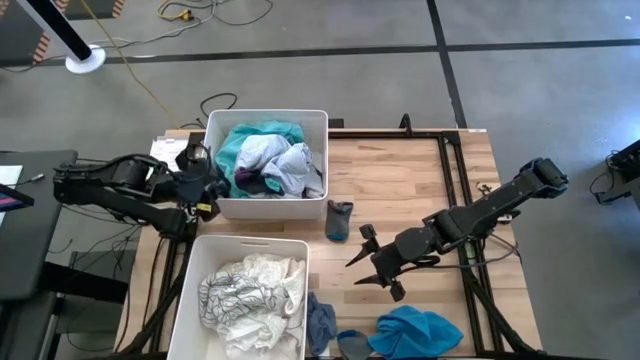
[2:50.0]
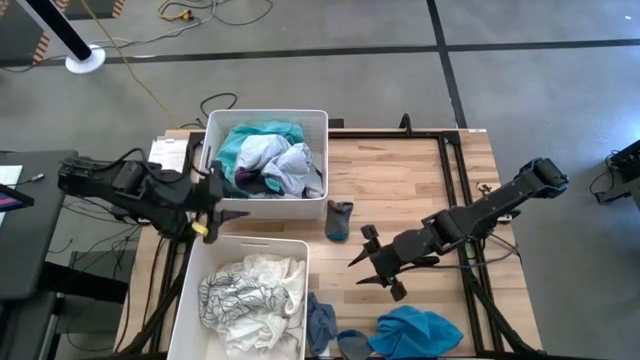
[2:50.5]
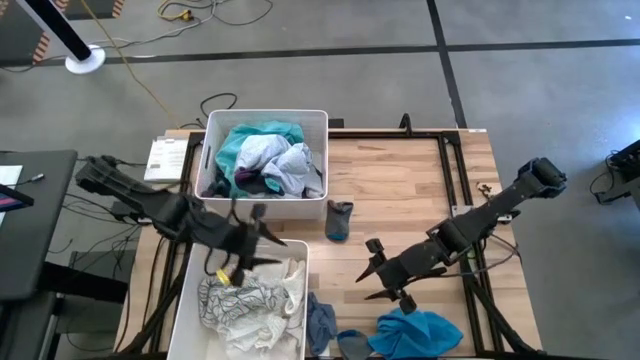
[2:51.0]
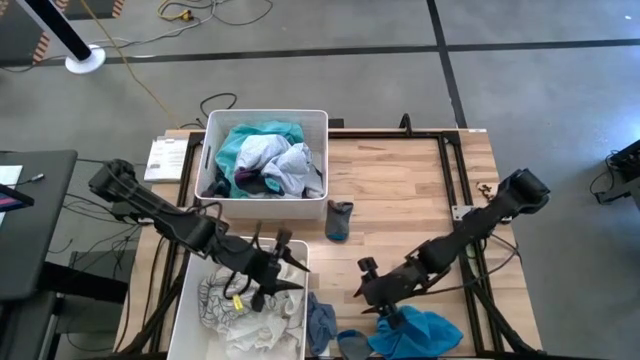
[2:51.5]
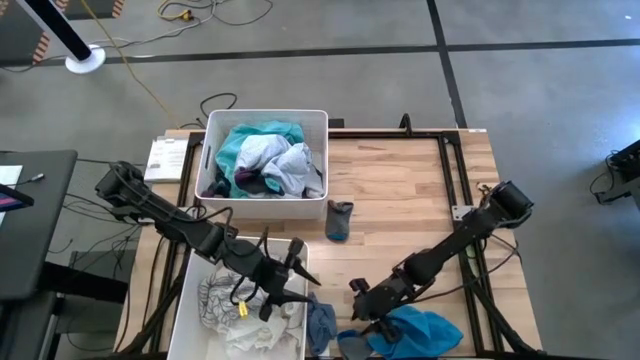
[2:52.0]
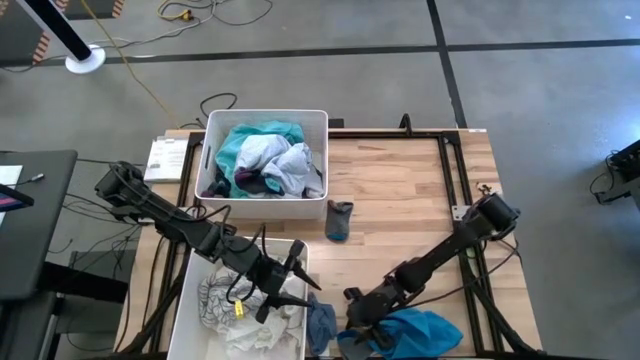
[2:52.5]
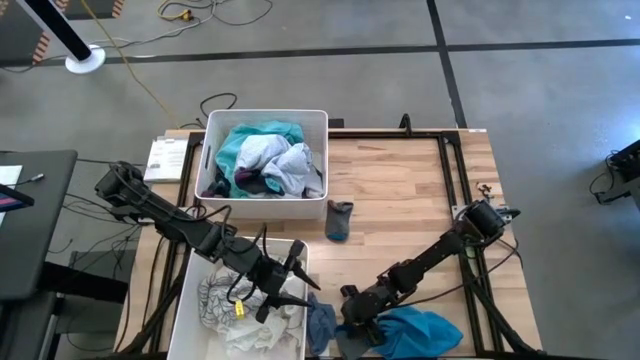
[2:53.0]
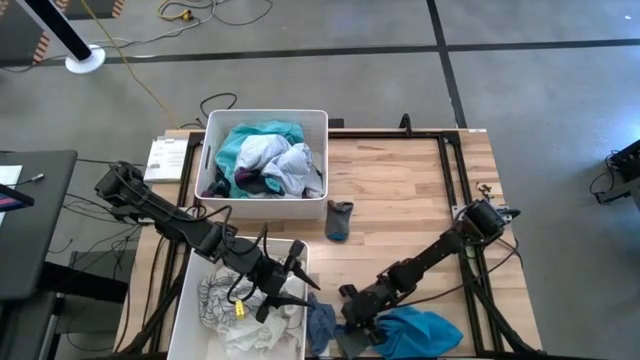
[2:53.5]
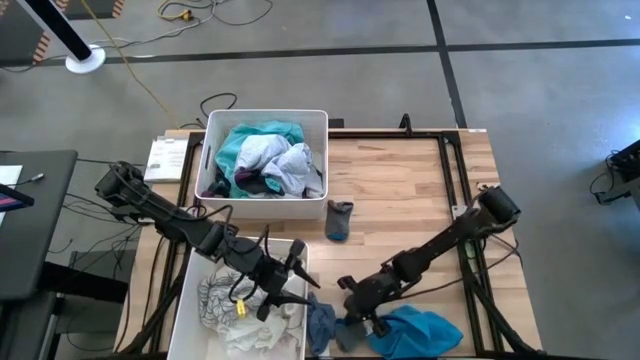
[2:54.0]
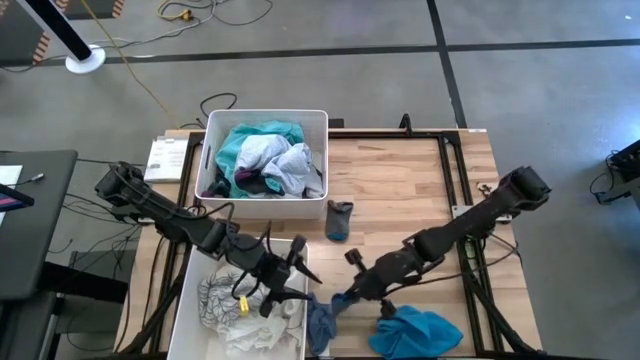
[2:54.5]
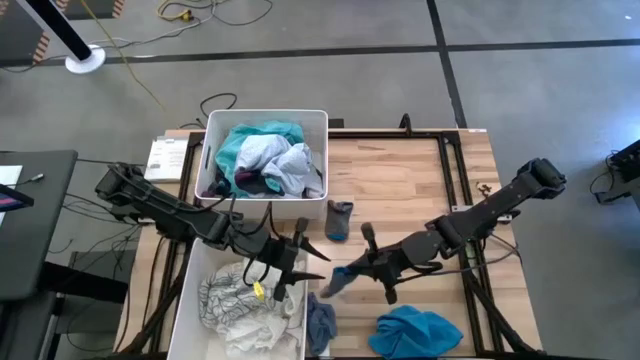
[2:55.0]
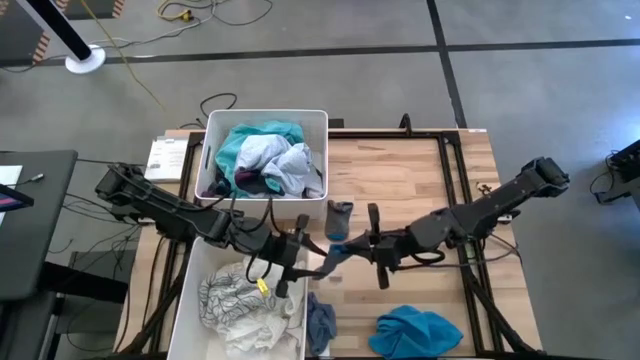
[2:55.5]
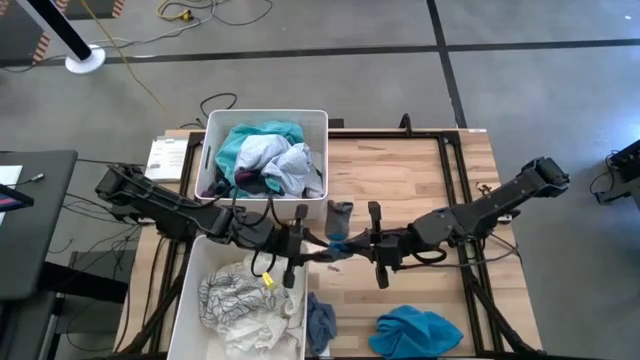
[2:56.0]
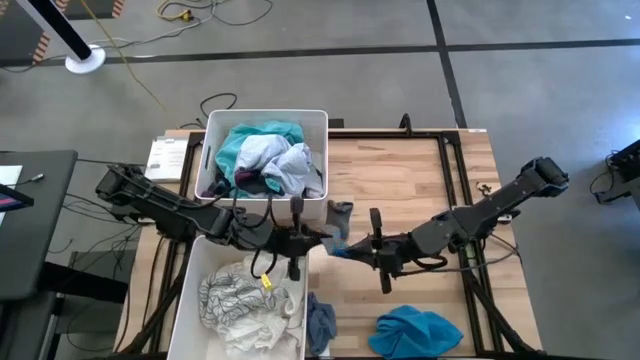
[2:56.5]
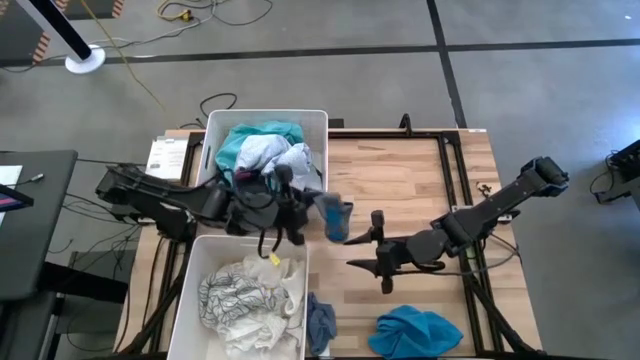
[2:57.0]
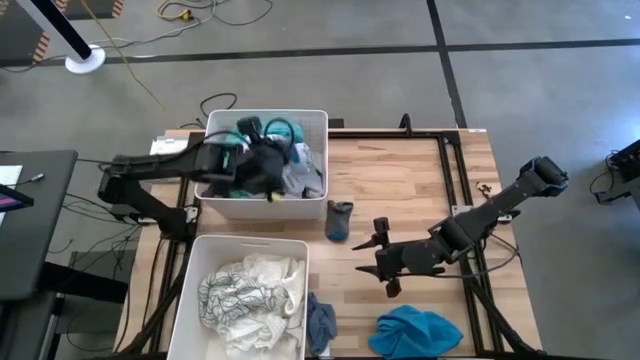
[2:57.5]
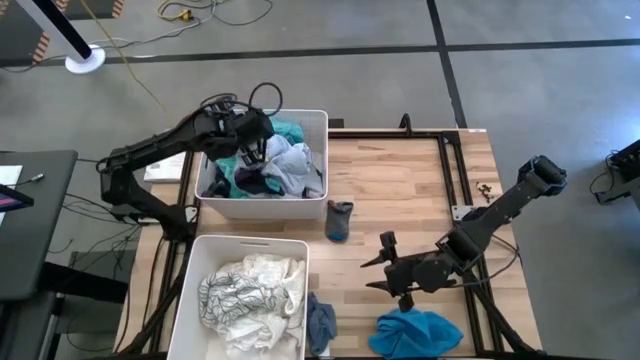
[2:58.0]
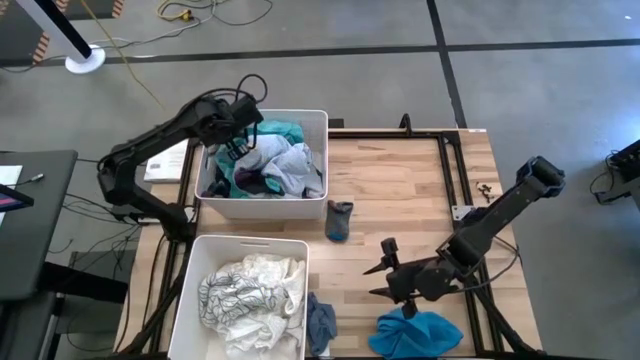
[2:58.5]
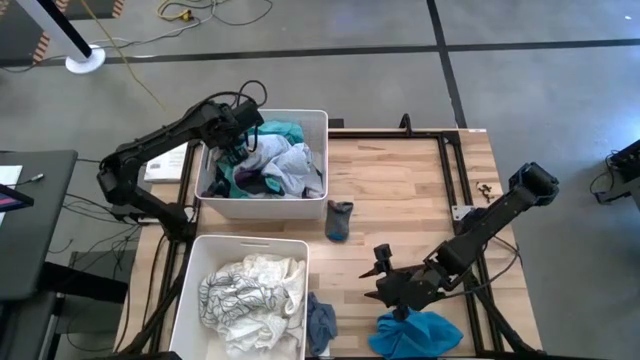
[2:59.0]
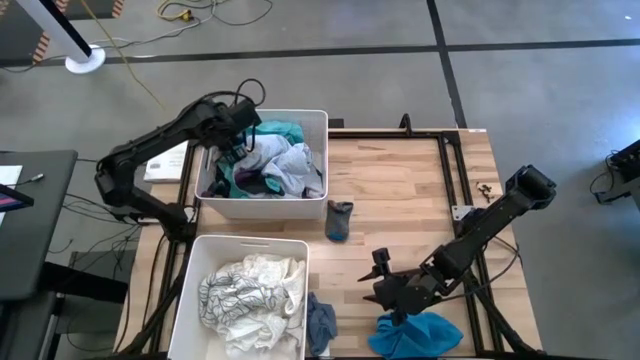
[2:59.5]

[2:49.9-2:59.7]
Task: Sort clothes
Put the bottom gray sock into the top white laundry bin

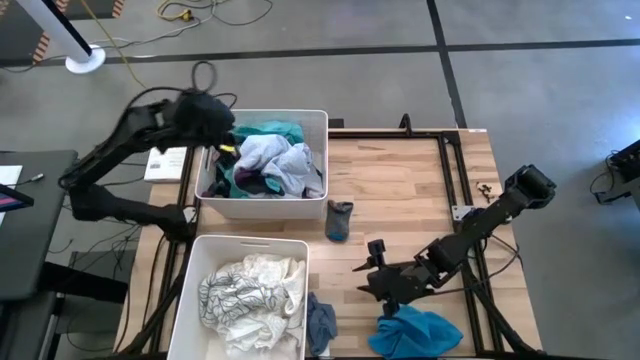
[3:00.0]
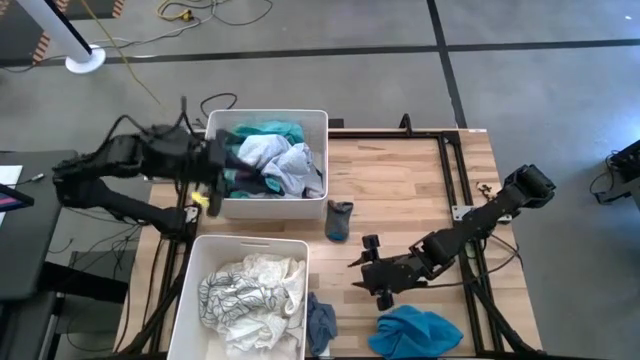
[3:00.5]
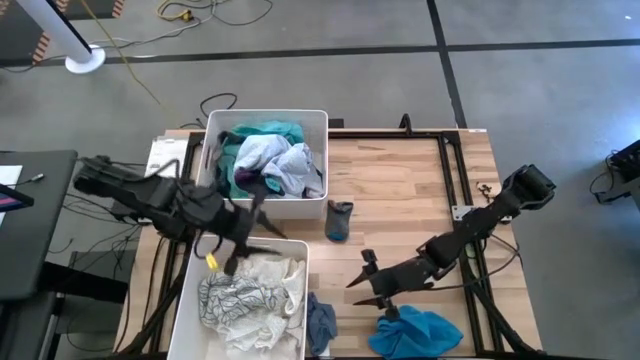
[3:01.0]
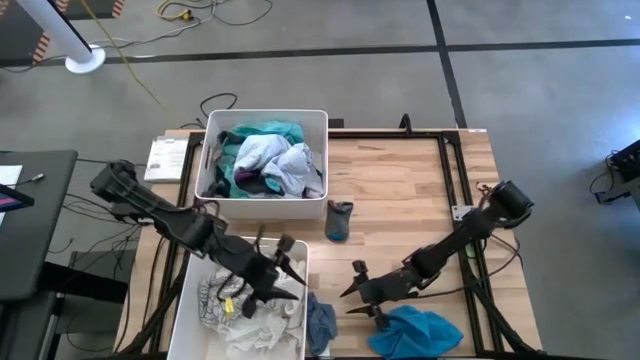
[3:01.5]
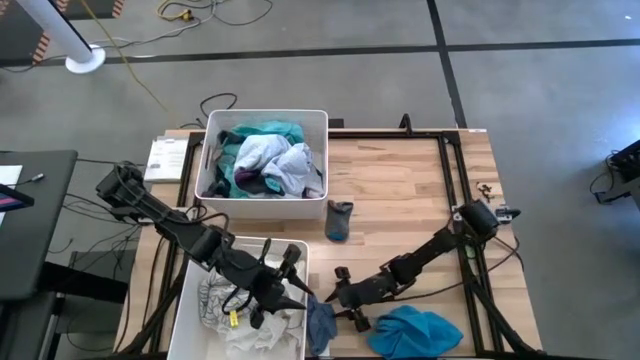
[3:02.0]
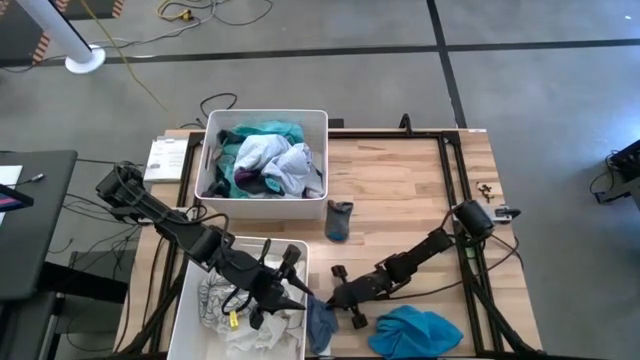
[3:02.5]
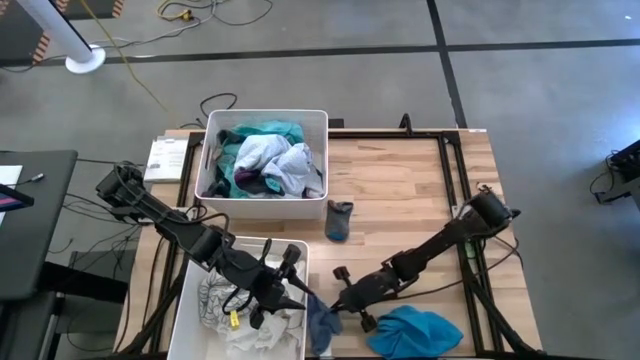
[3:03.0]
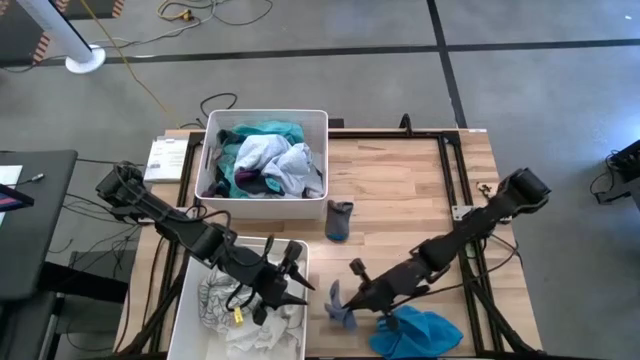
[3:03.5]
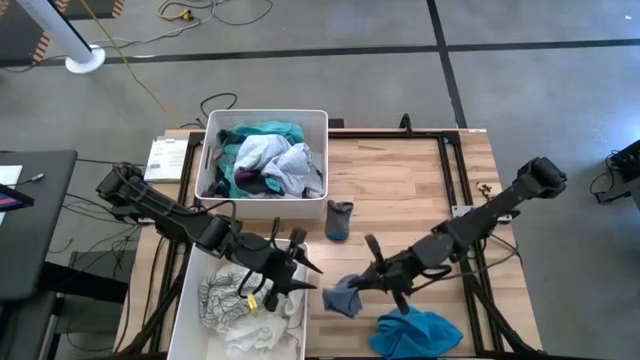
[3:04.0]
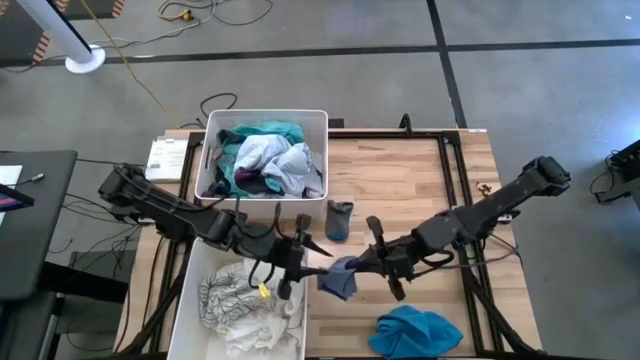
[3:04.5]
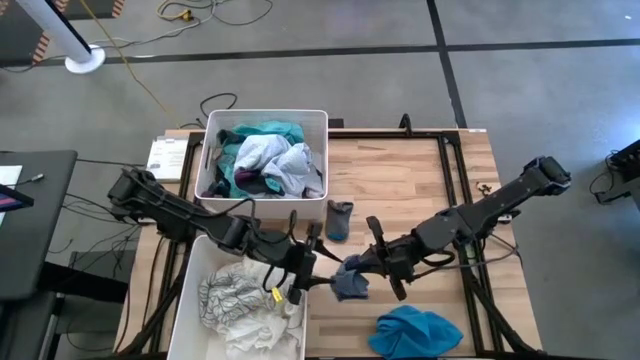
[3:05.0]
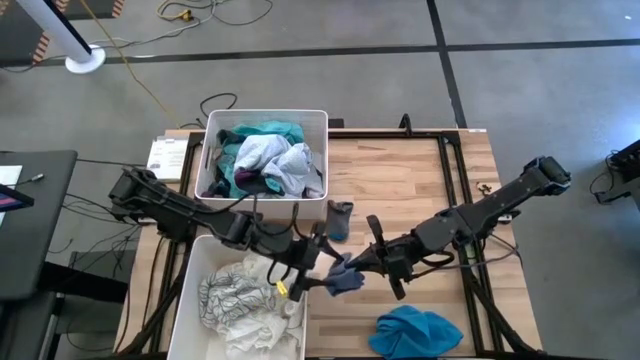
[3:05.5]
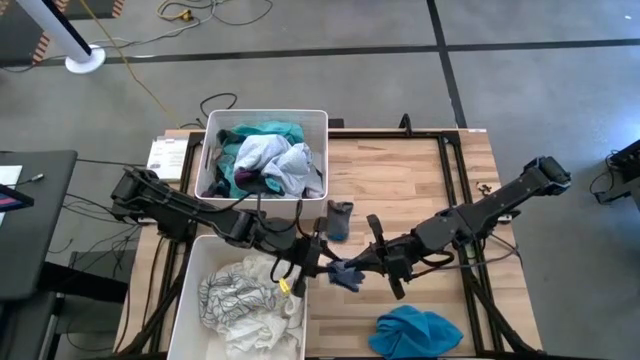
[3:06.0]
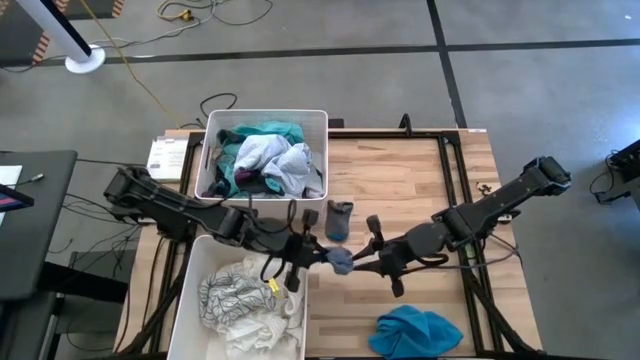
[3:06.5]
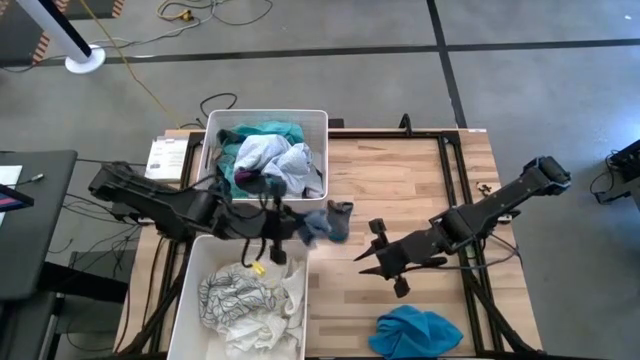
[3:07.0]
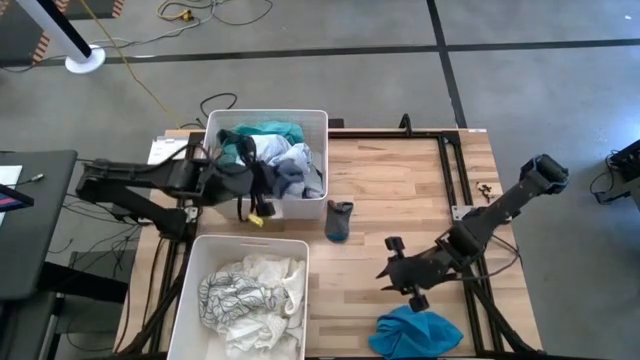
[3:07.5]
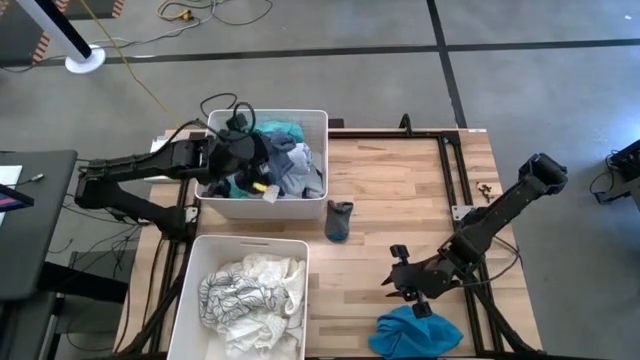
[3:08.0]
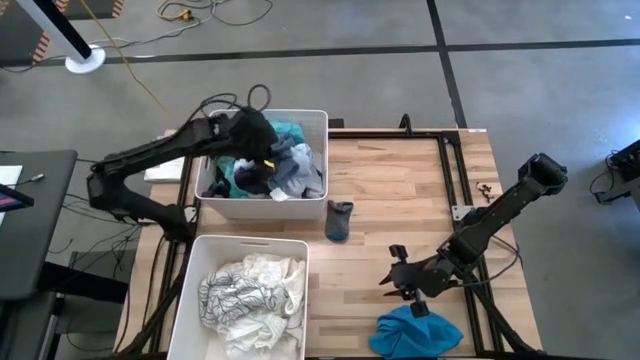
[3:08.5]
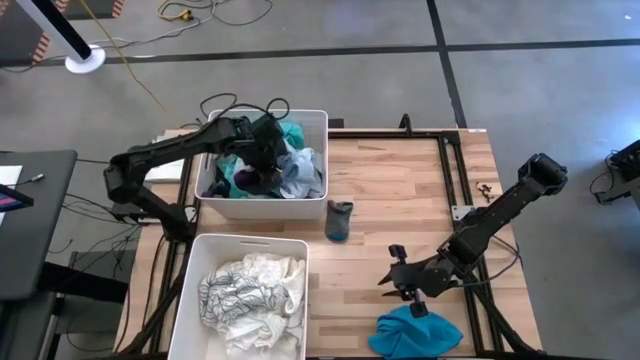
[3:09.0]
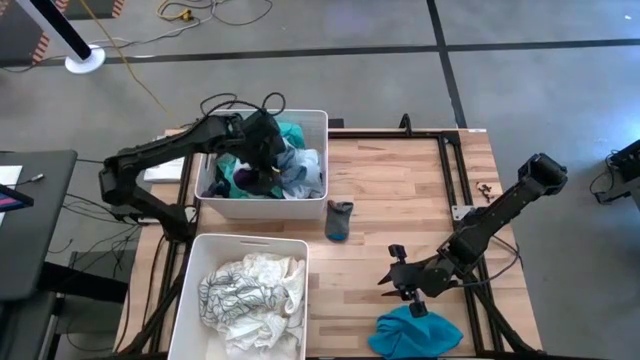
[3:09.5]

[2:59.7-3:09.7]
Put the pair of blue socks into the top white laundry bin

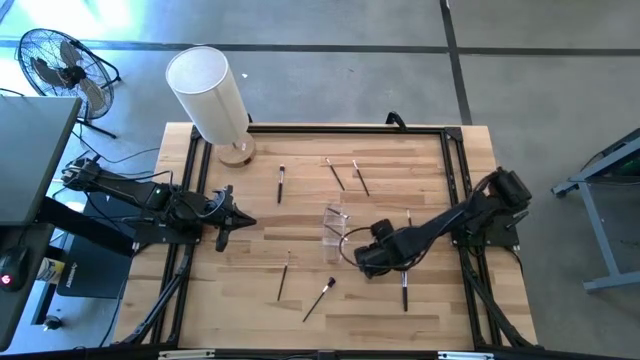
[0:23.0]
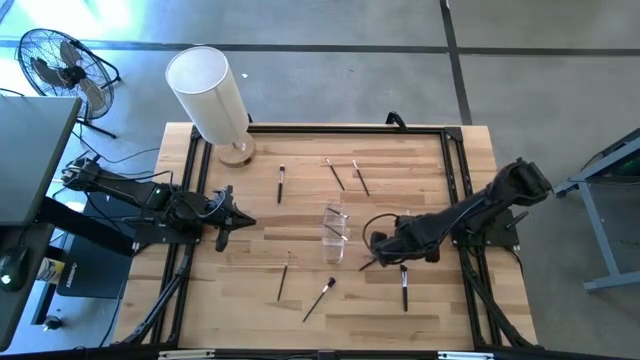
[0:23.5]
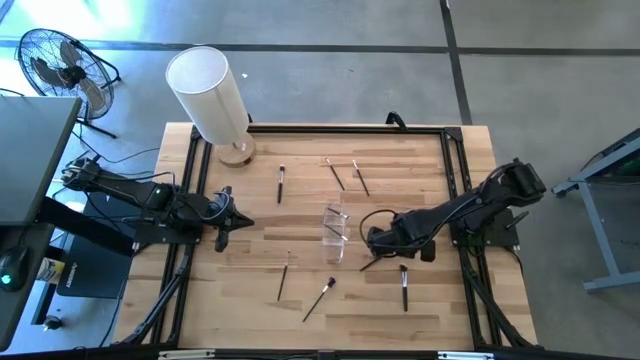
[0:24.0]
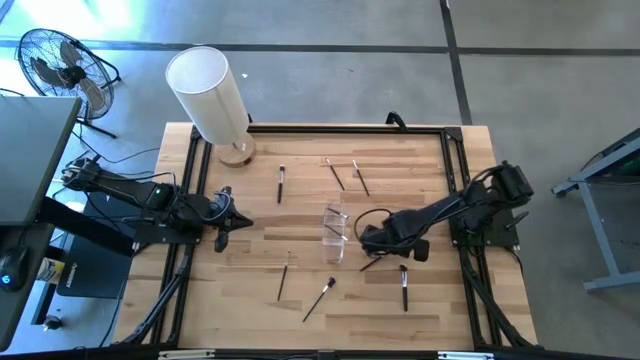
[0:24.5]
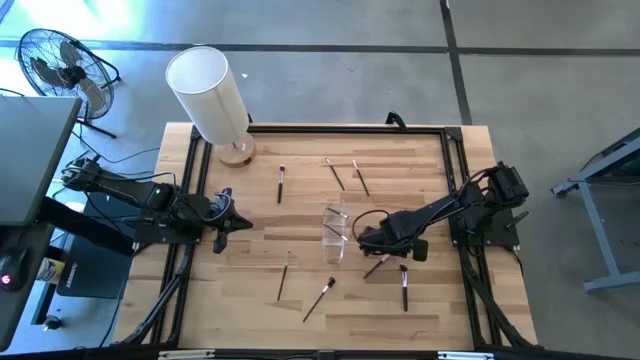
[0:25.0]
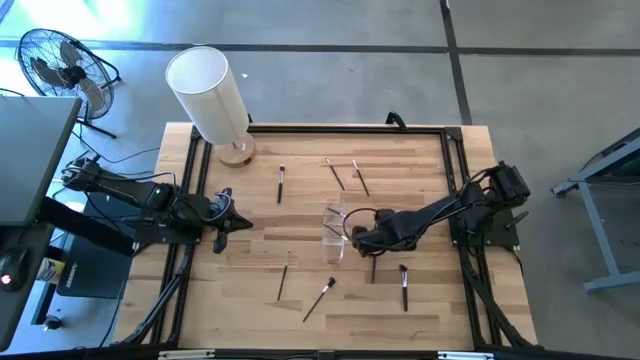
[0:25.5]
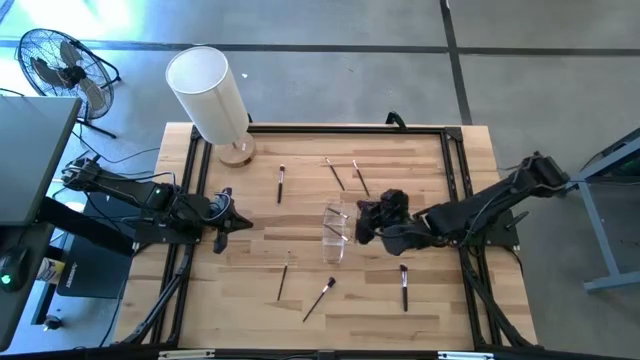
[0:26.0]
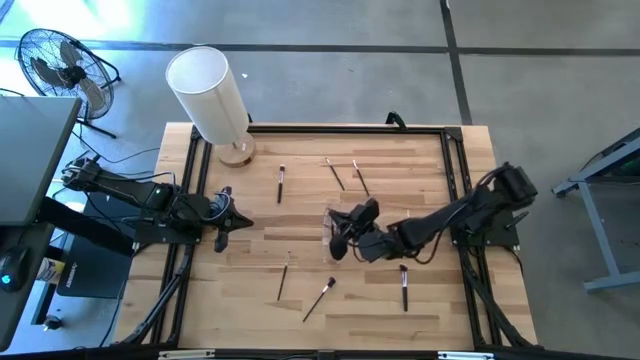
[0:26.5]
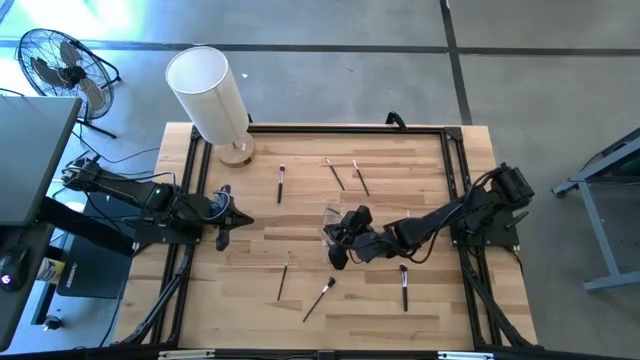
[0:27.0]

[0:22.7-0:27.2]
Task: Pick & Place Makeup Brushes
Put the eyeshadow brush into the transparent organizer
